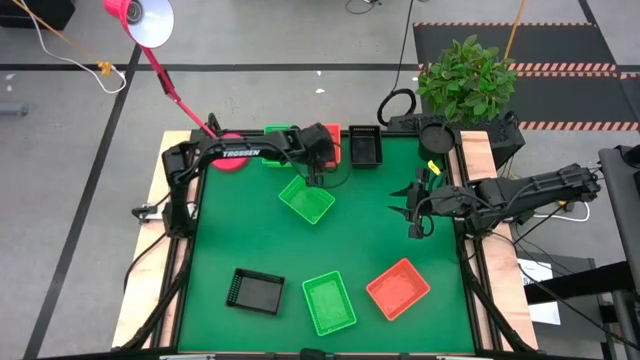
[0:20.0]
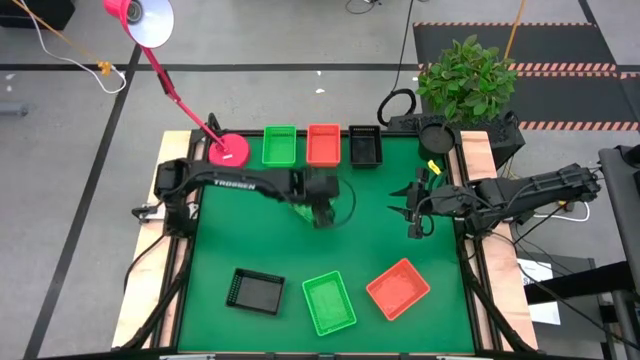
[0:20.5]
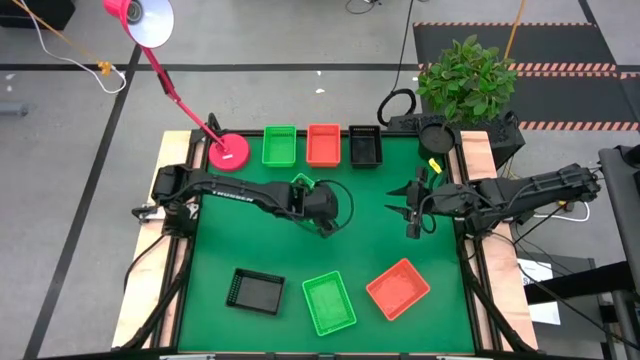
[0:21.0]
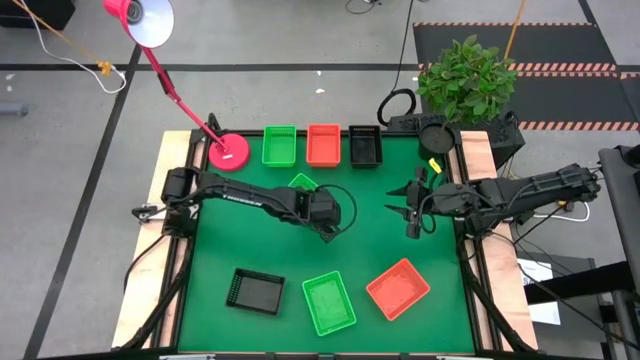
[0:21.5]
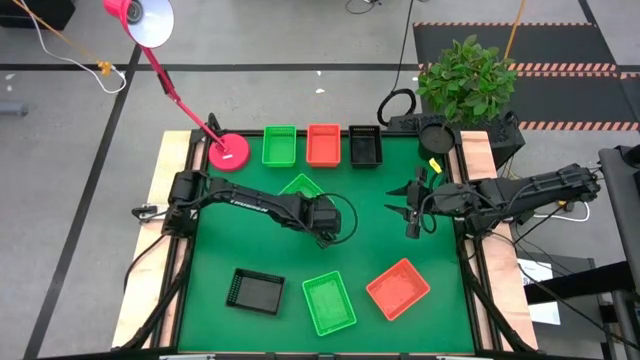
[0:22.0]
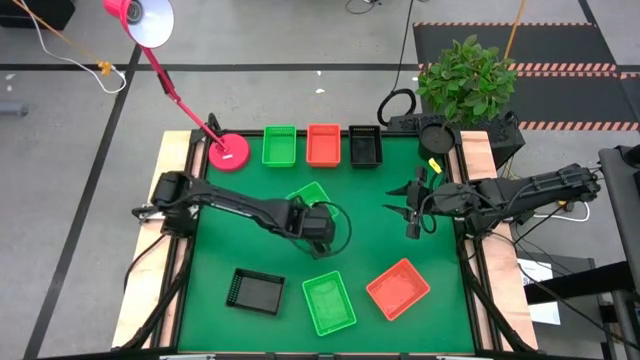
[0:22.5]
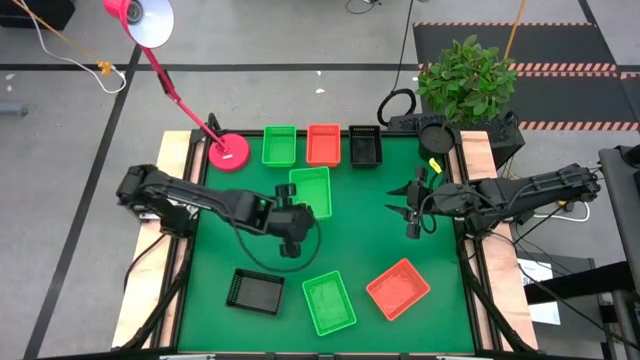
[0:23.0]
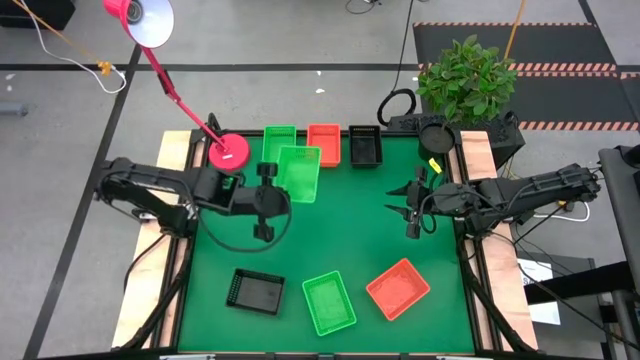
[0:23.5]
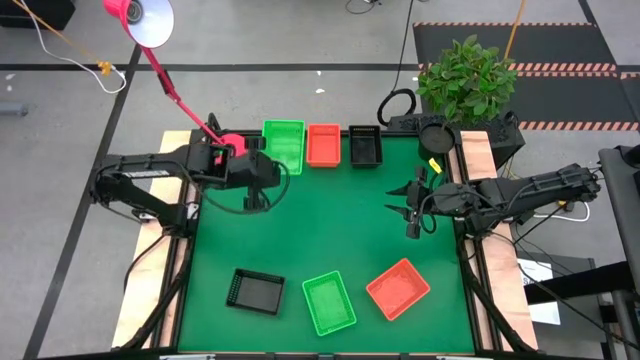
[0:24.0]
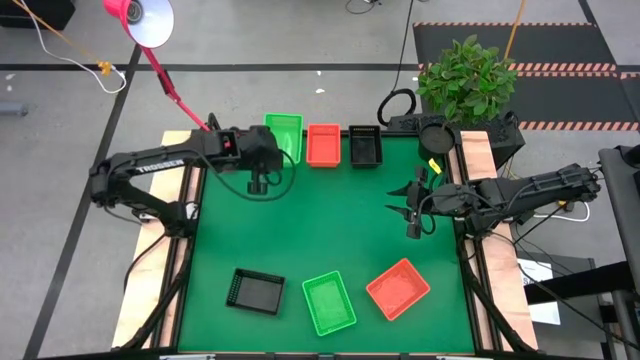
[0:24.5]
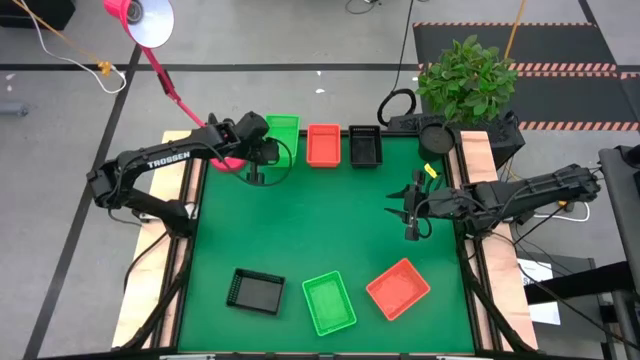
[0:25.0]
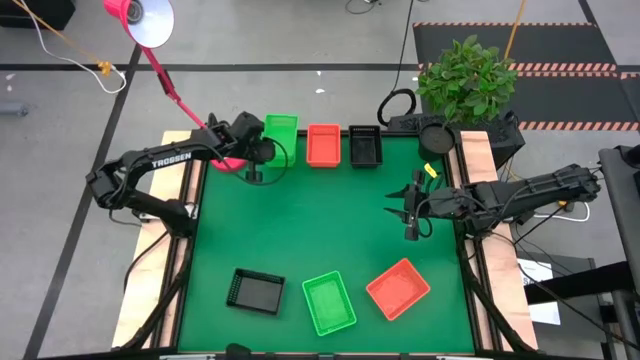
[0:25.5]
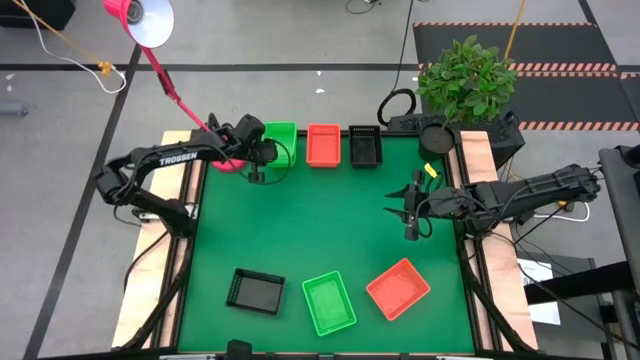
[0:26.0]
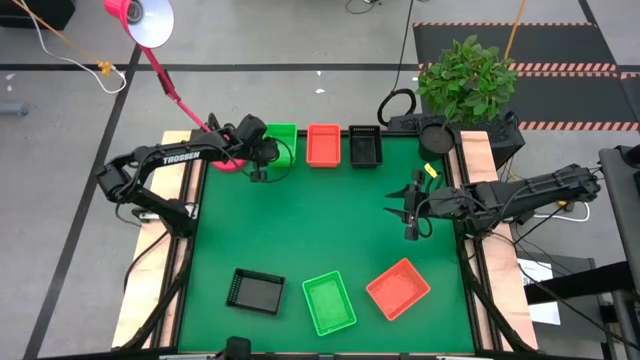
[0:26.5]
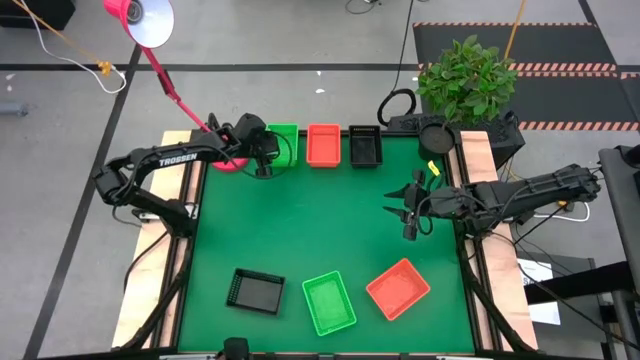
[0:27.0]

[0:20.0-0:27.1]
Stack the center green basket on top of the top green basket

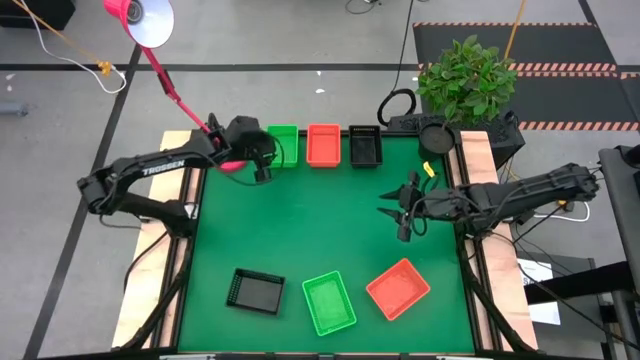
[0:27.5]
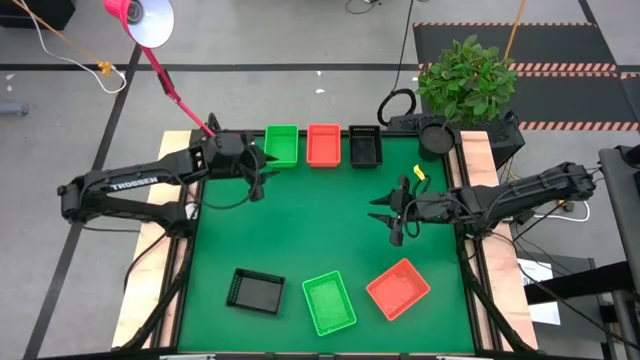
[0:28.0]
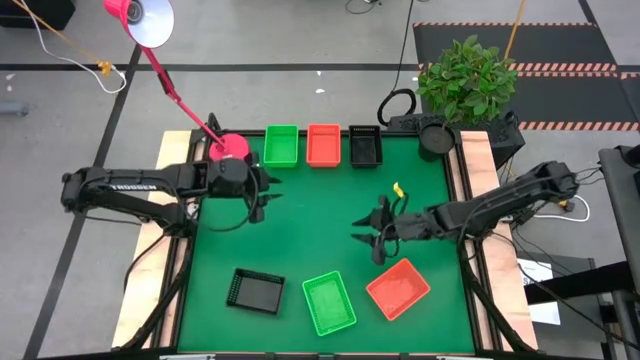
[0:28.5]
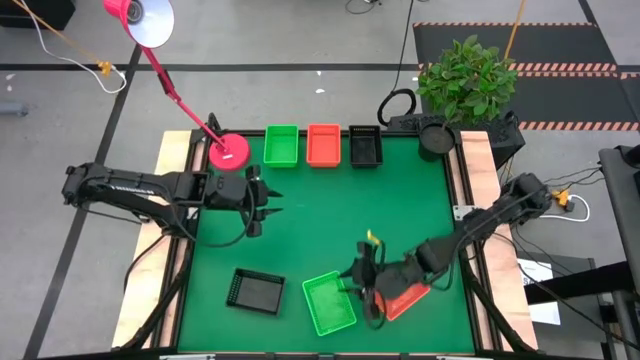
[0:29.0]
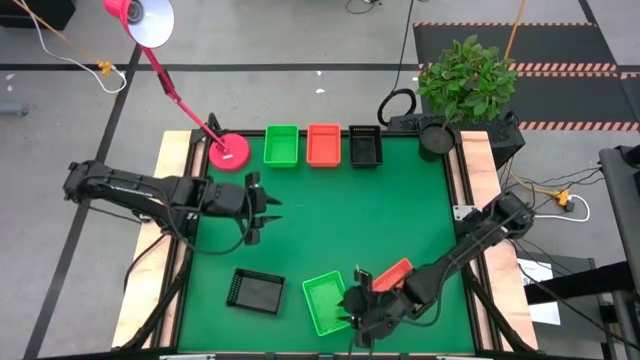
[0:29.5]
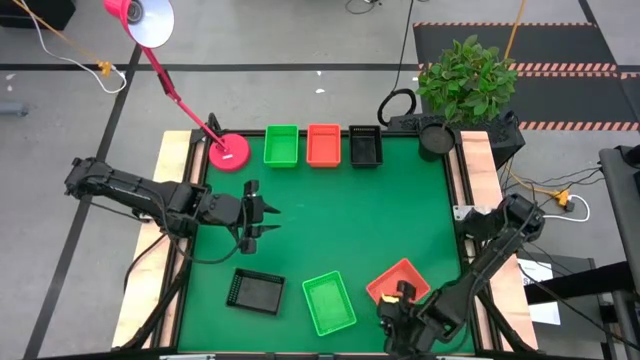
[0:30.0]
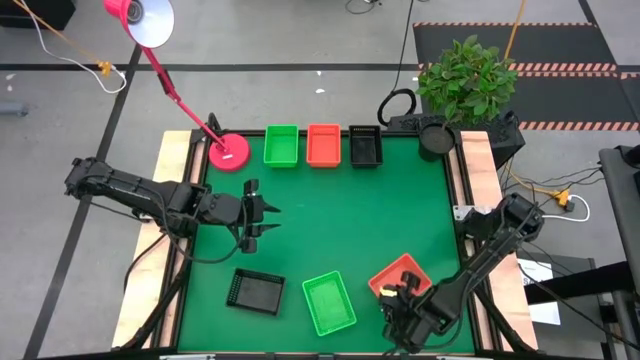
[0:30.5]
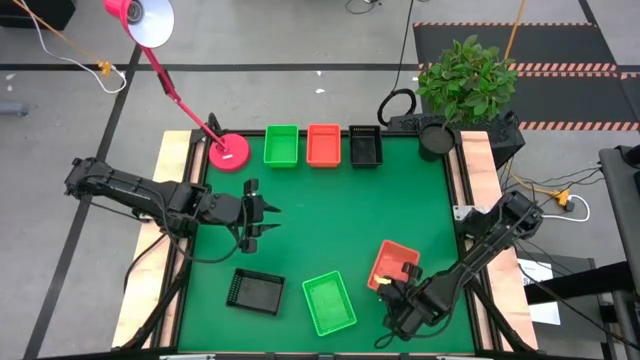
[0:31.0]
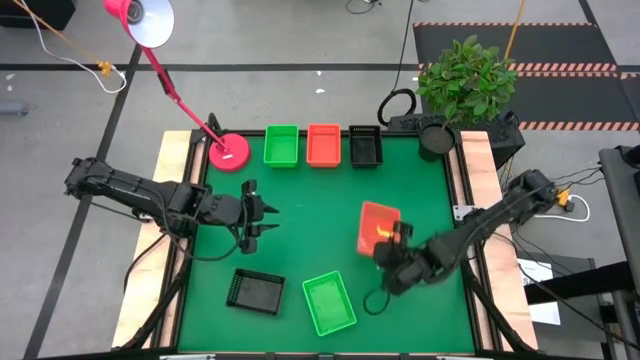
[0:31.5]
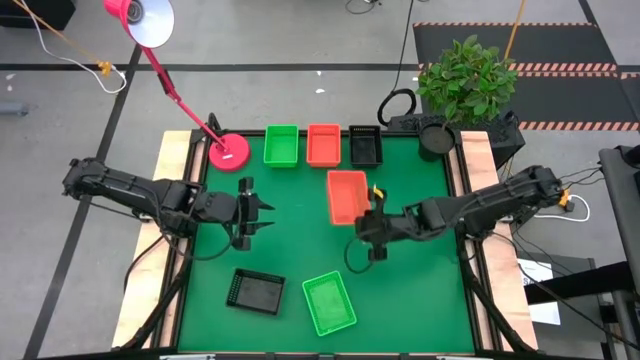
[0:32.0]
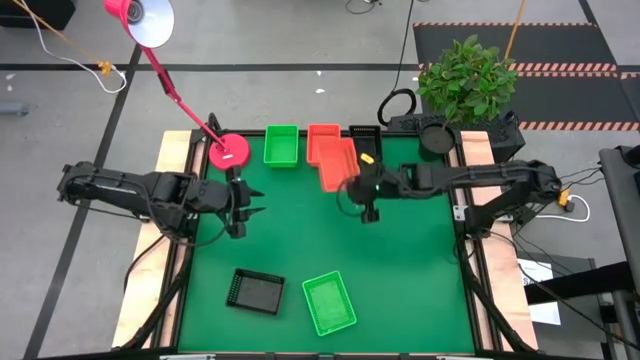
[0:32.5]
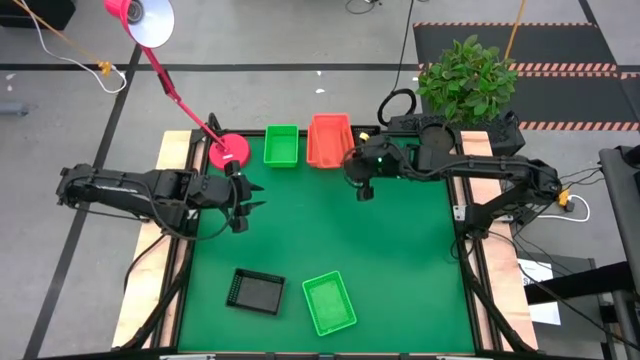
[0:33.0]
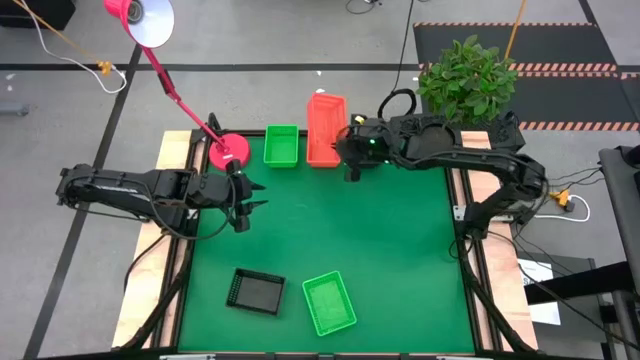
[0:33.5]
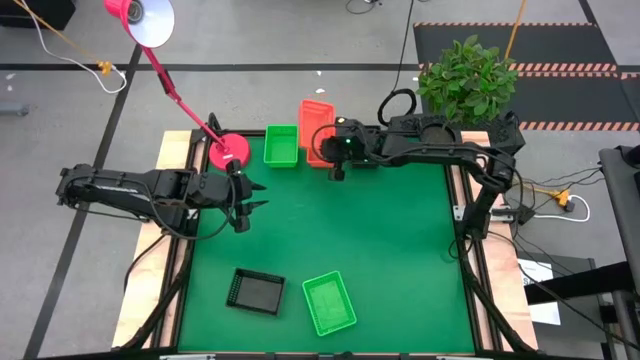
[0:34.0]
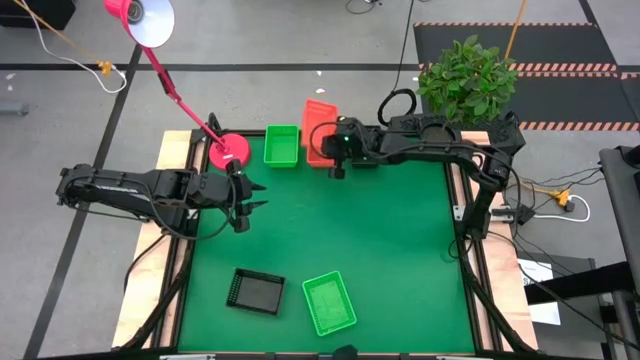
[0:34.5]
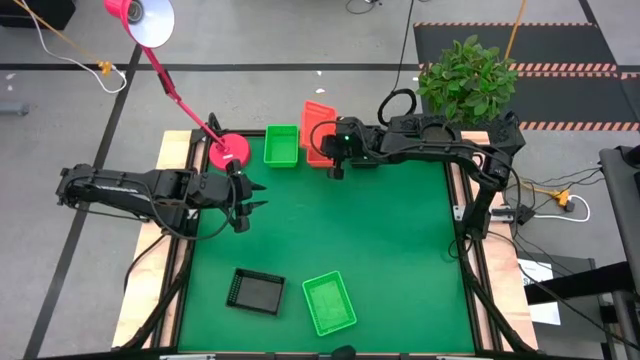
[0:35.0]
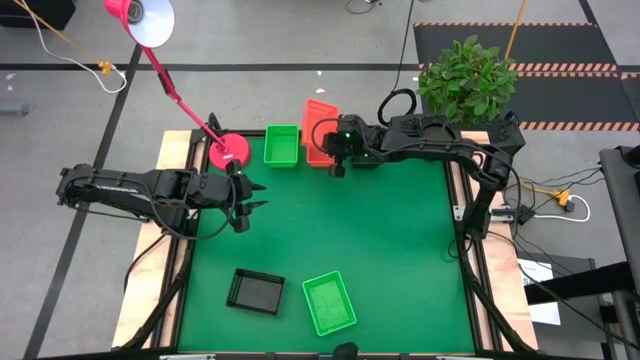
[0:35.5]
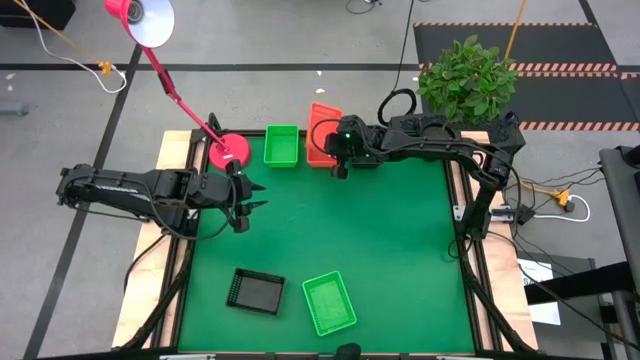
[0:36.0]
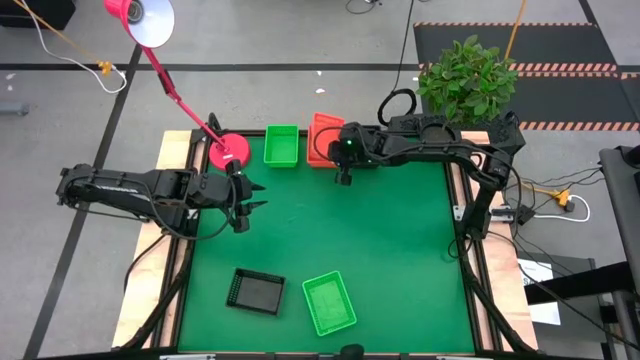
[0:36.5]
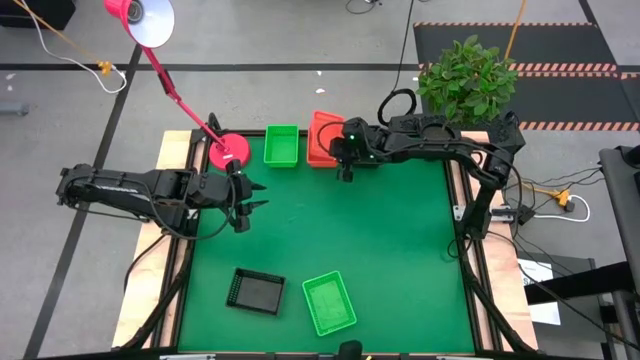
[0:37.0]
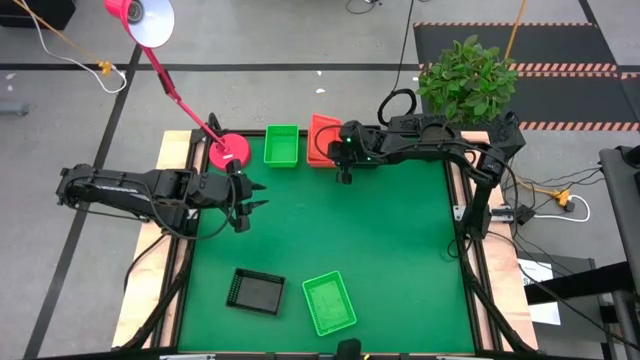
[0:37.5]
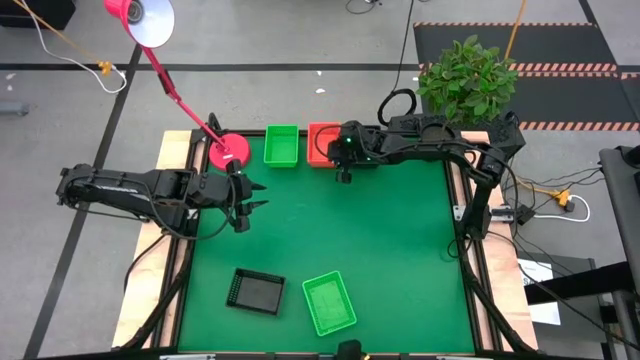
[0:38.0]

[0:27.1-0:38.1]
Stack the bottom orange basket on top of the orange stacked baskets
